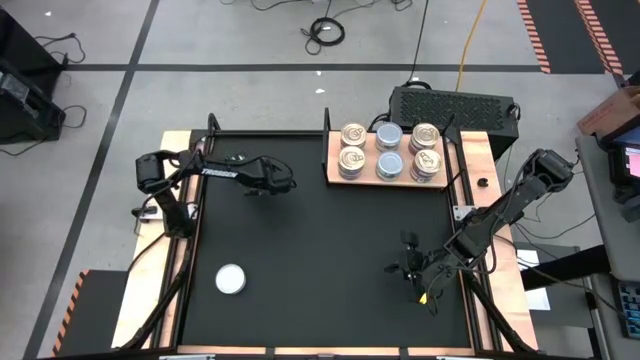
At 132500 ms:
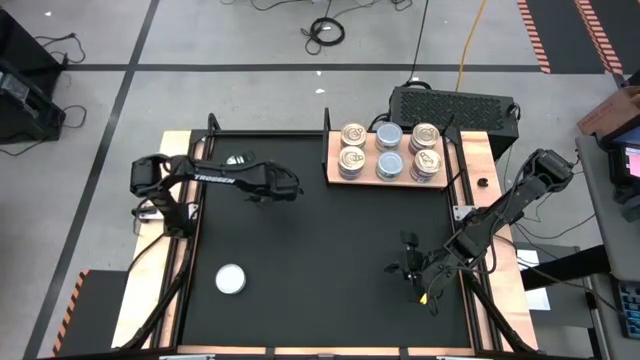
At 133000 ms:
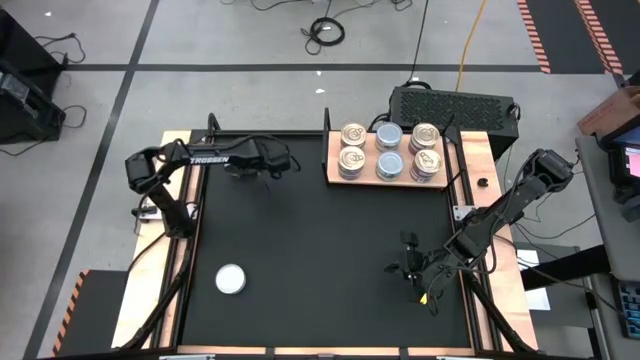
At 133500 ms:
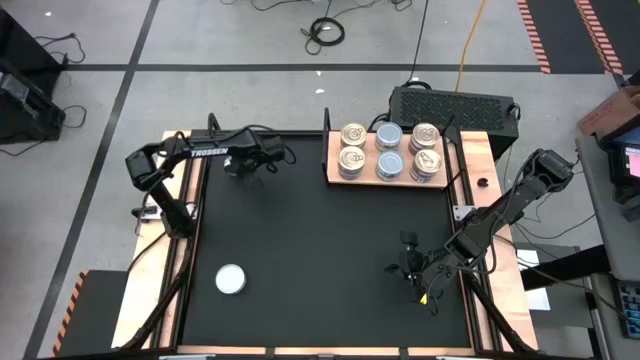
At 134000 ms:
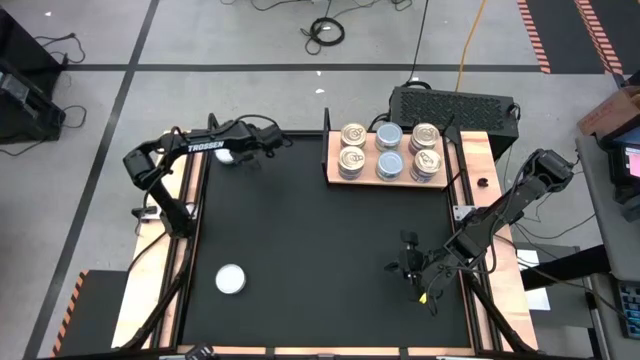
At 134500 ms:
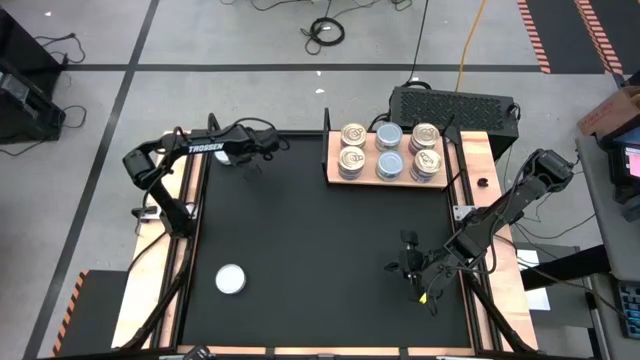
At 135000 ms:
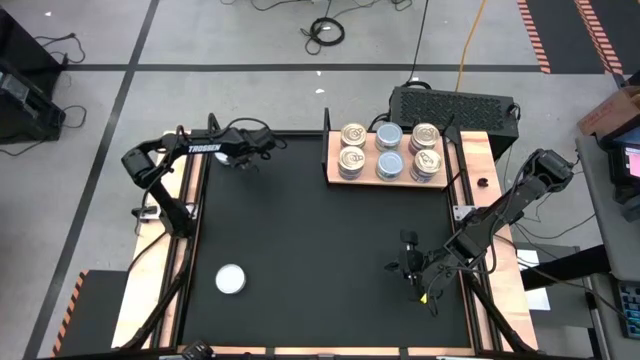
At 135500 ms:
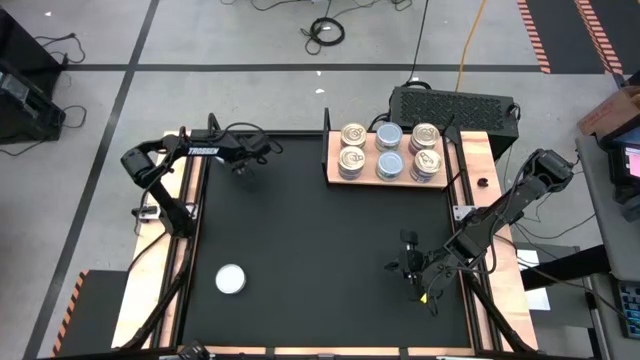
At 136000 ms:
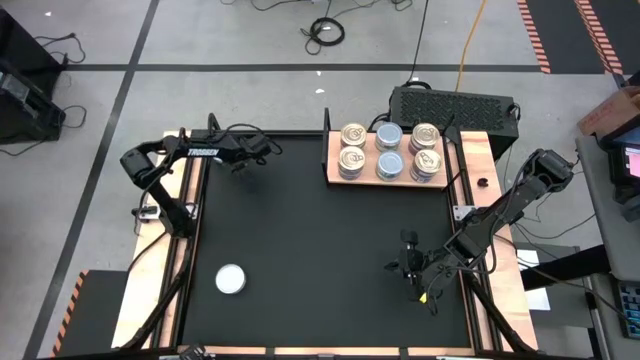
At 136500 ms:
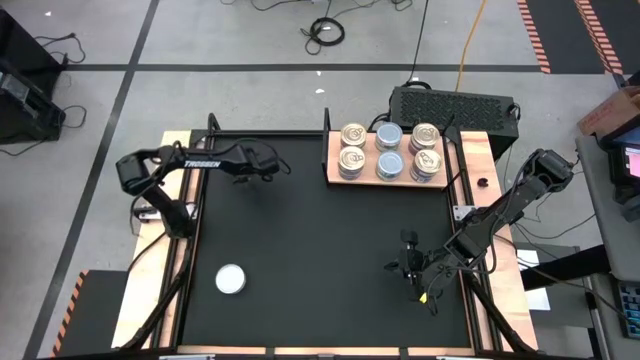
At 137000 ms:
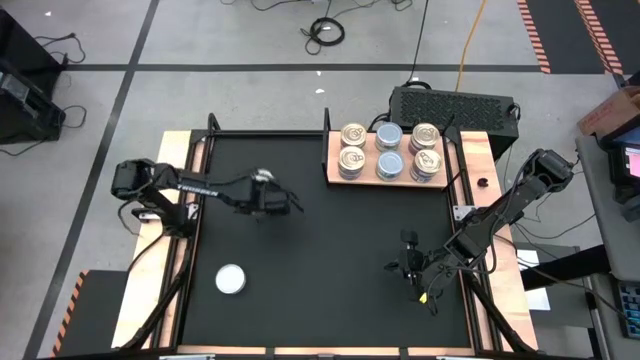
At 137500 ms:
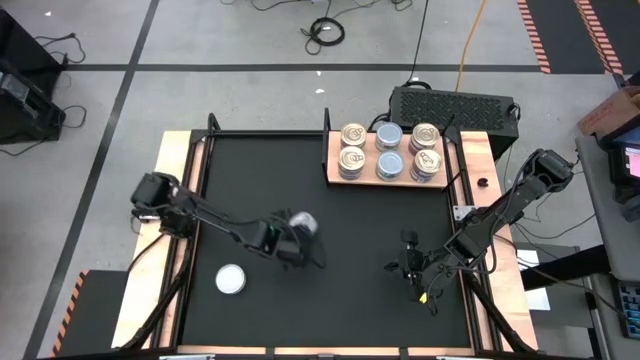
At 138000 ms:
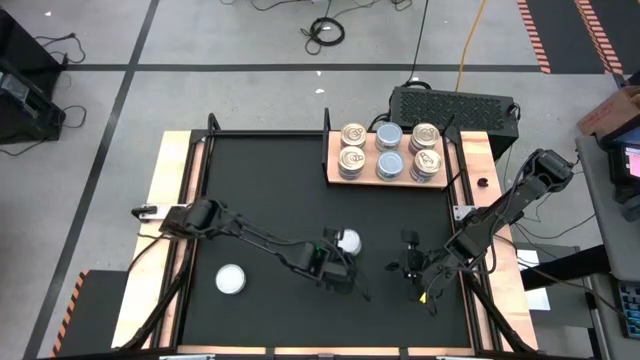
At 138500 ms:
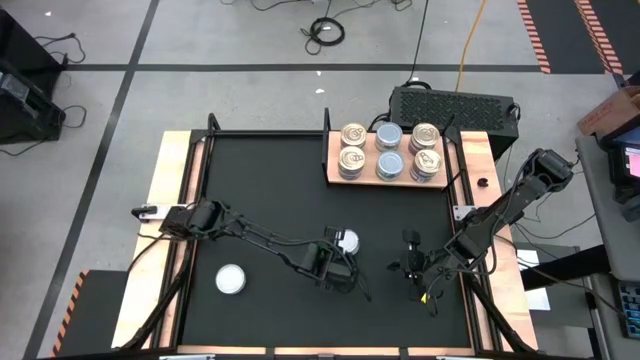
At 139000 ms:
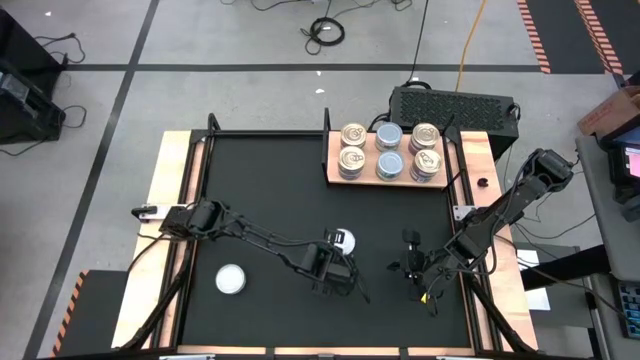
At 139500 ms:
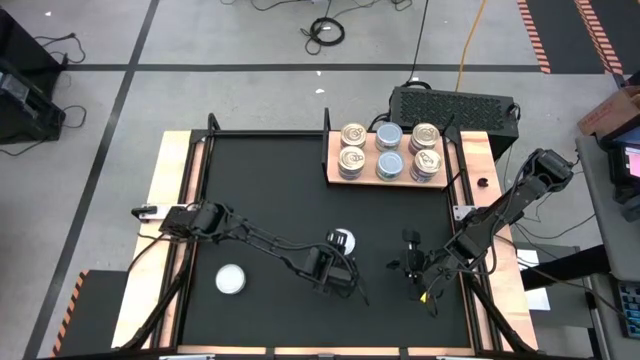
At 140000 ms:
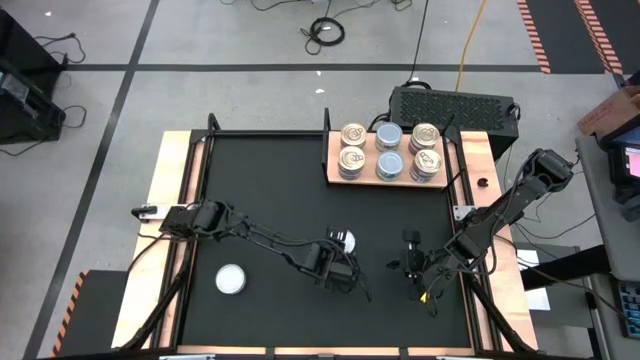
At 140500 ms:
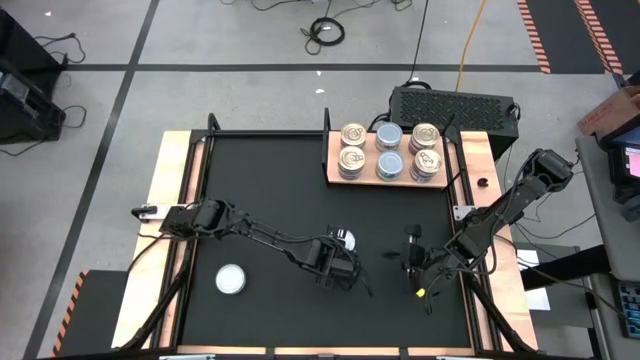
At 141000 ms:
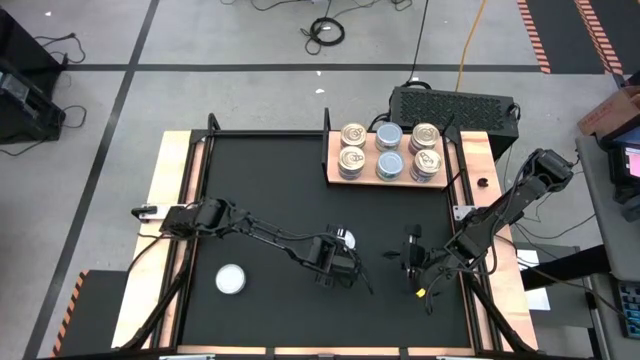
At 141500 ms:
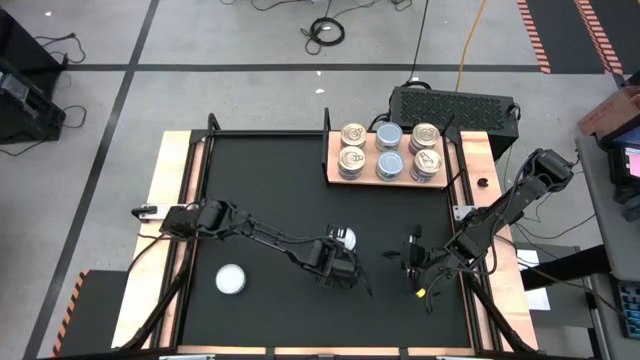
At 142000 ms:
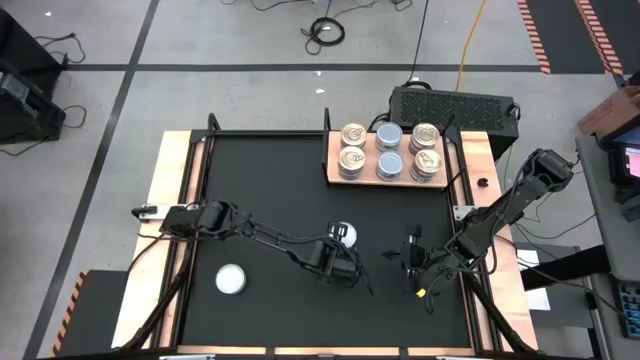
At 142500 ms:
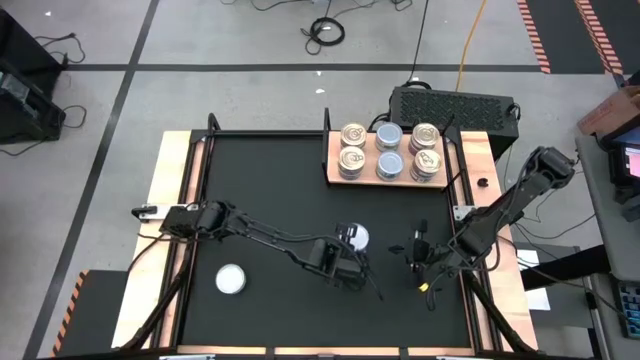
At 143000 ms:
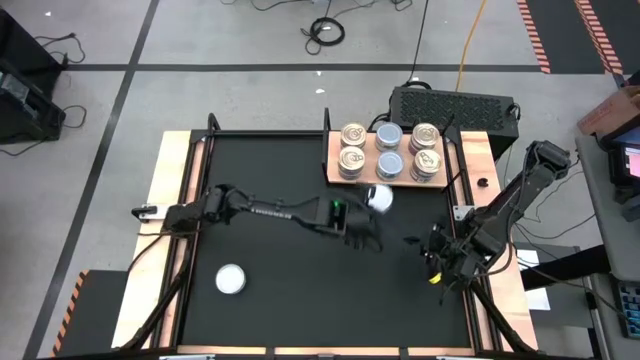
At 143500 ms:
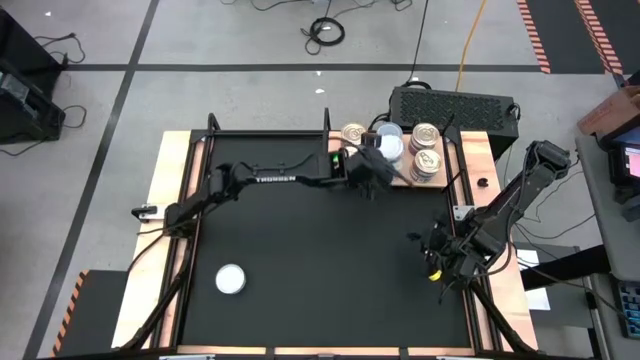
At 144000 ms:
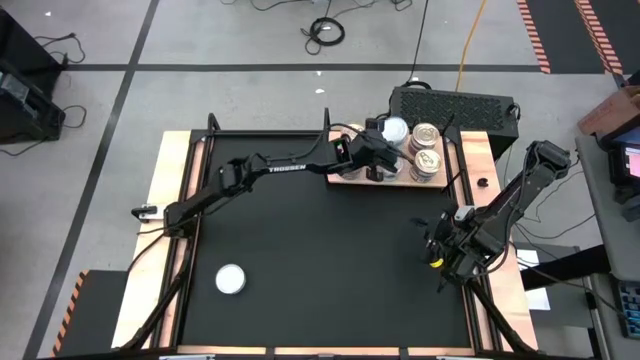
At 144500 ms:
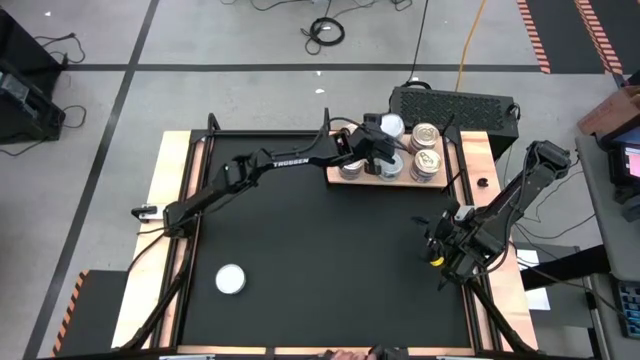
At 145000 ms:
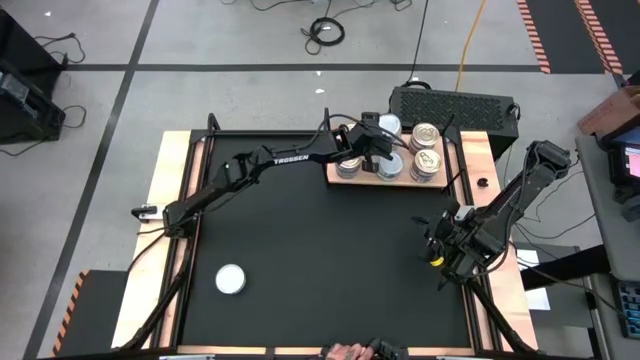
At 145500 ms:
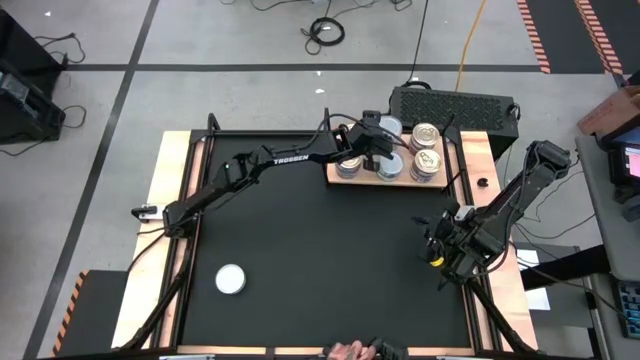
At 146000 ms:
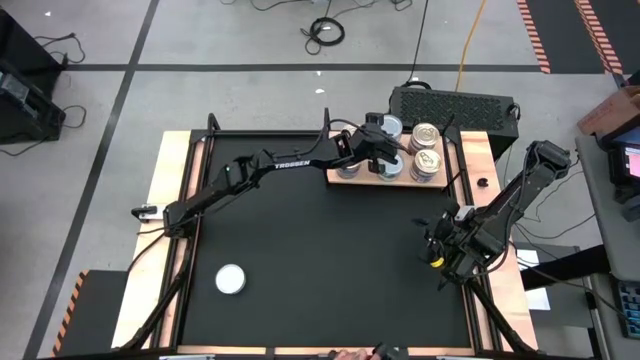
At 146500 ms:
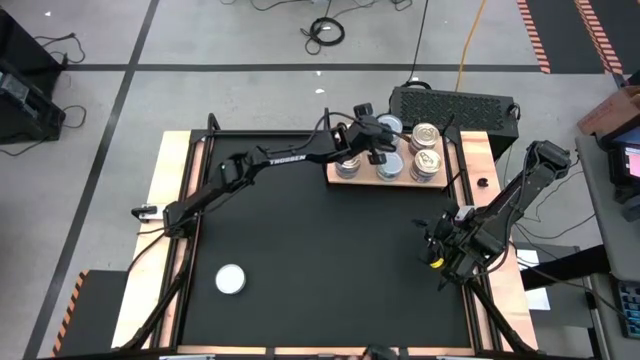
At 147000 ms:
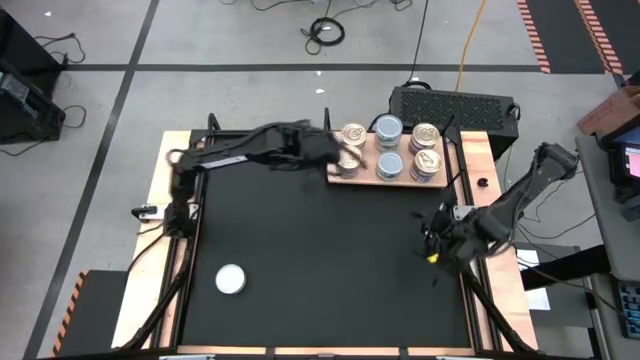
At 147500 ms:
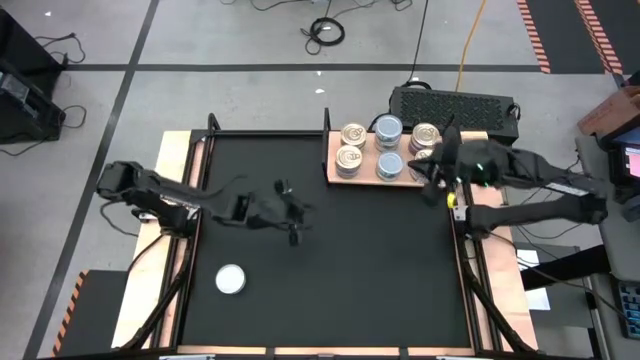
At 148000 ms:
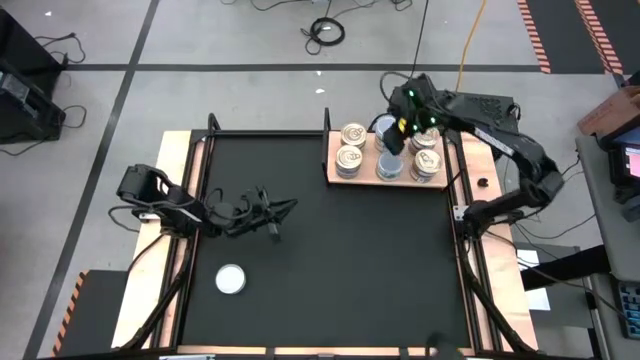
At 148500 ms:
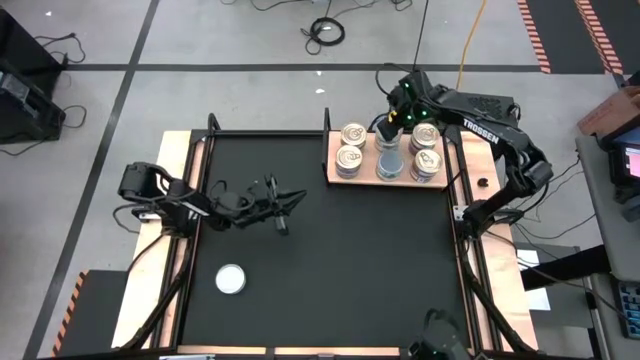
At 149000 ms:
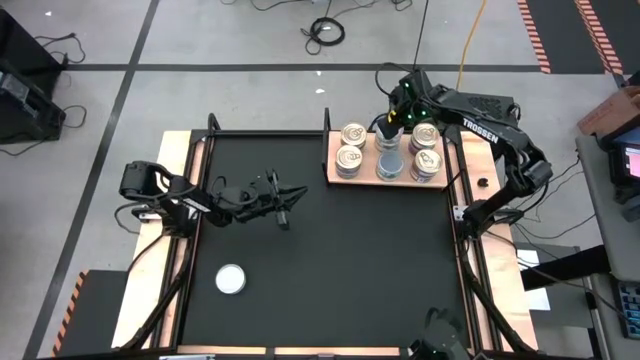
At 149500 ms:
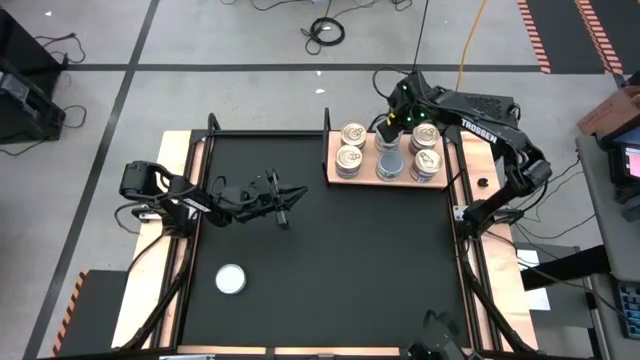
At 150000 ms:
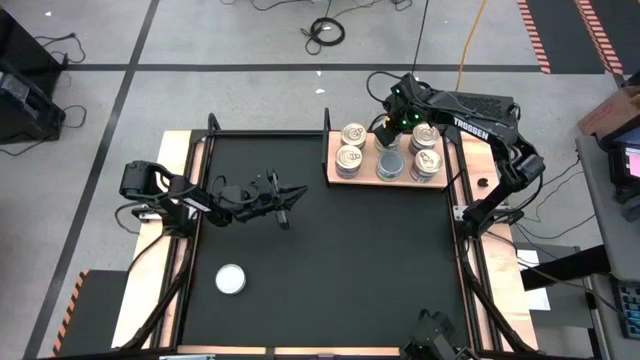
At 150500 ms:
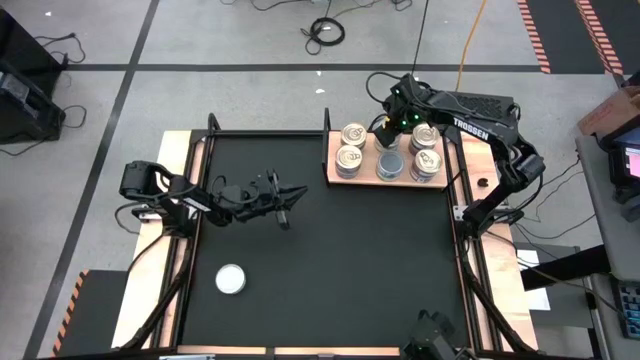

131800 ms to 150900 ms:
Task: Stack canned seafood by type on shelf
Stack the green tuna can on top of the top green tuna cans on the shelf

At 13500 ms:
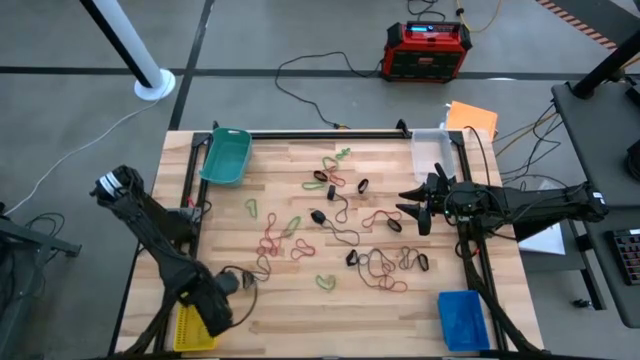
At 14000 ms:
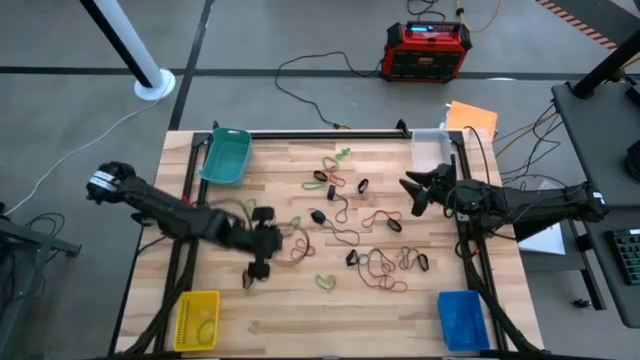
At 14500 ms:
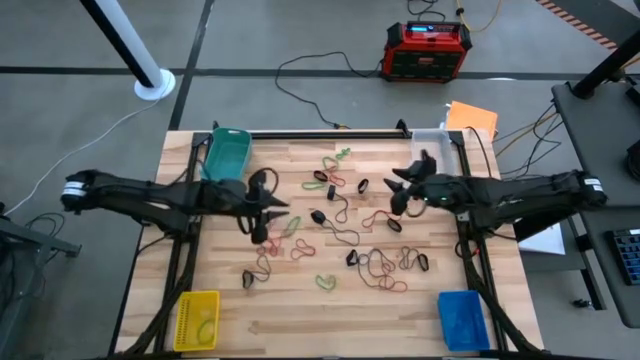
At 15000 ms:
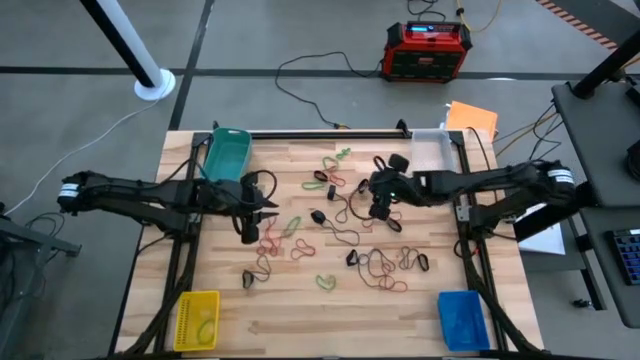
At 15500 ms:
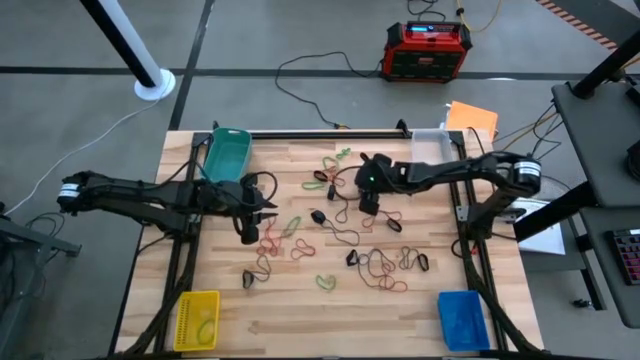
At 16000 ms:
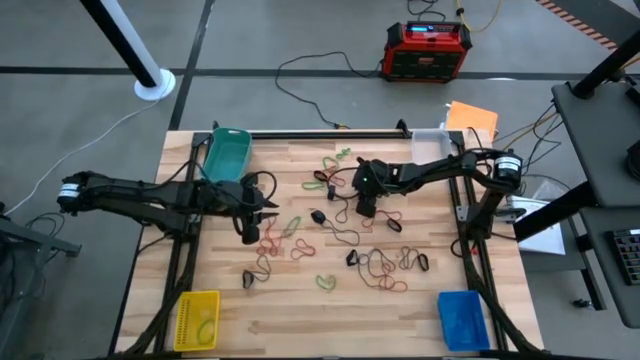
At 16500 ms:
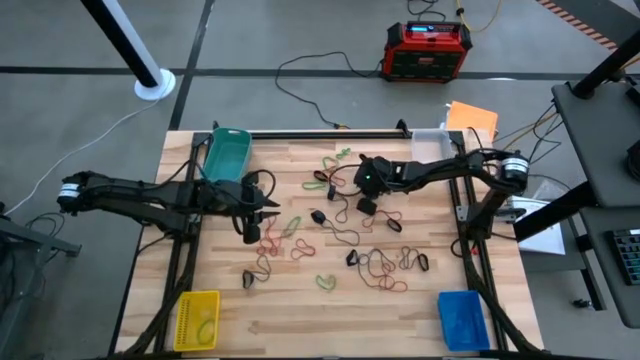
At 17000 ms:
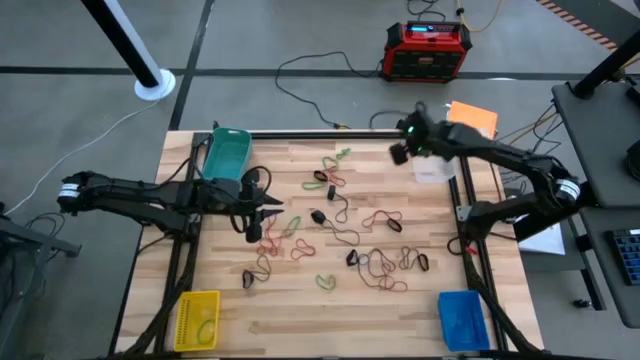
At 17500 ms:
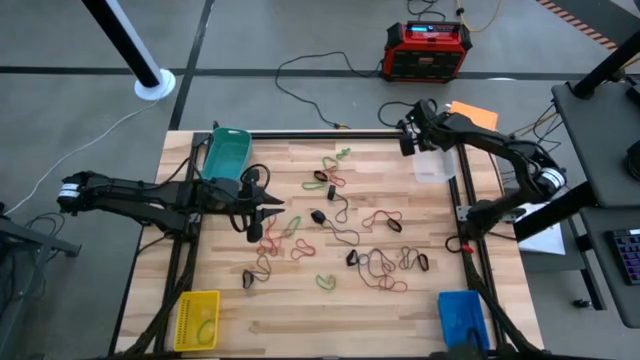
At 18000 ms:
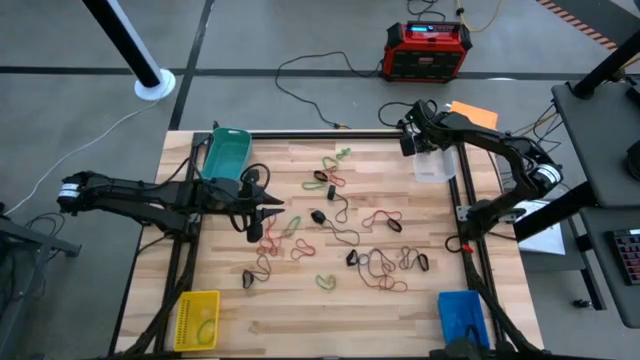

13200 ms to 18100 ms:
Task: Sort rubber bands into baskets
Put the black rubber band into the transparent bin
